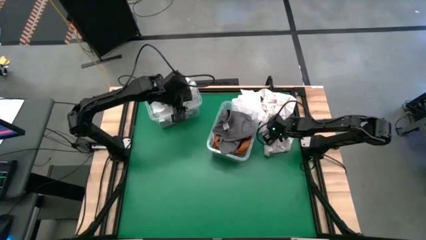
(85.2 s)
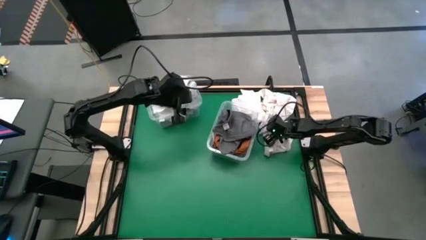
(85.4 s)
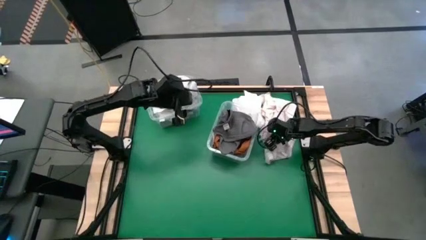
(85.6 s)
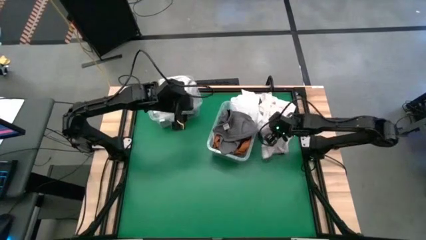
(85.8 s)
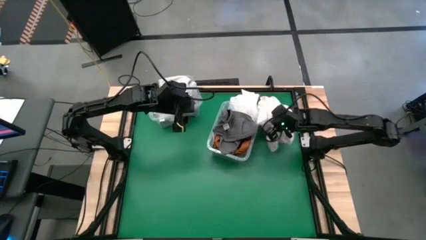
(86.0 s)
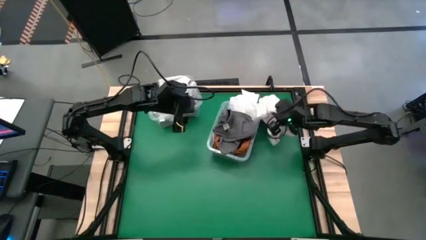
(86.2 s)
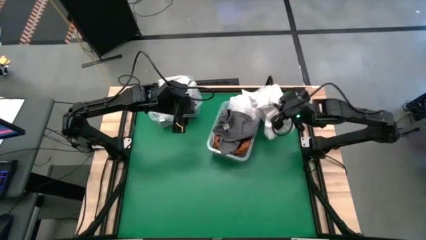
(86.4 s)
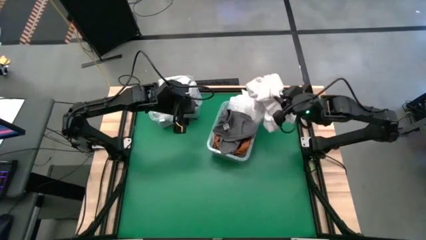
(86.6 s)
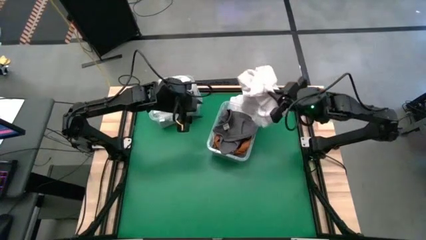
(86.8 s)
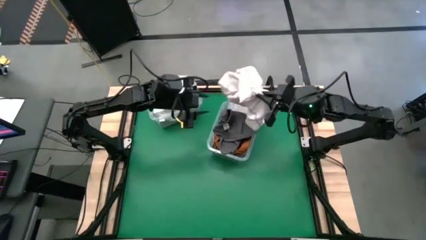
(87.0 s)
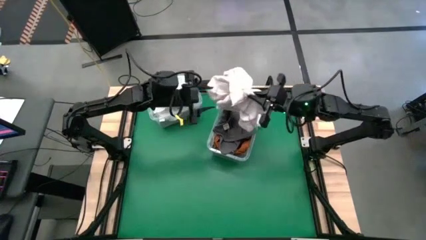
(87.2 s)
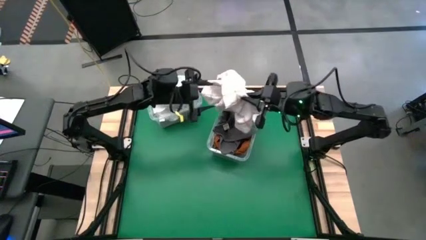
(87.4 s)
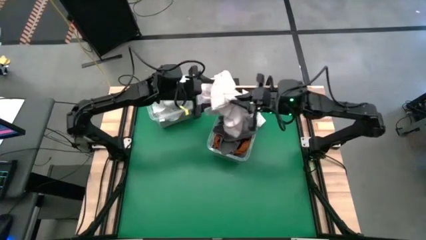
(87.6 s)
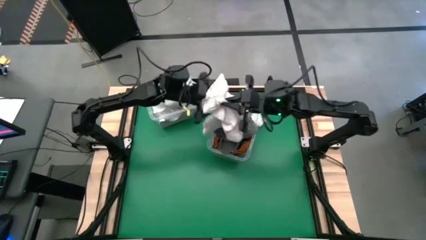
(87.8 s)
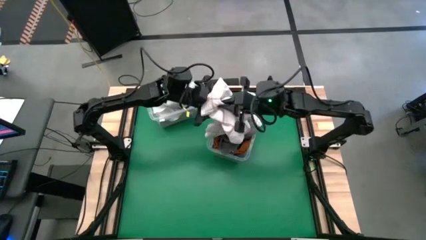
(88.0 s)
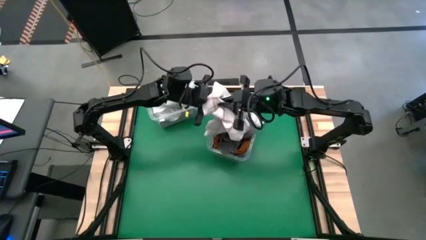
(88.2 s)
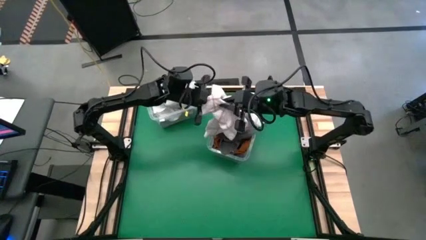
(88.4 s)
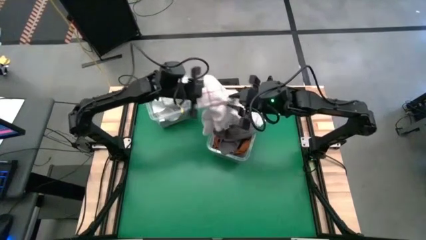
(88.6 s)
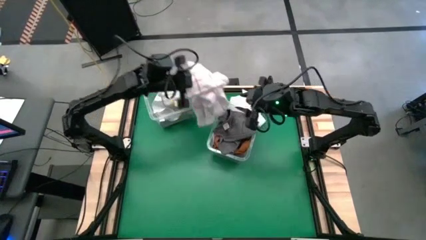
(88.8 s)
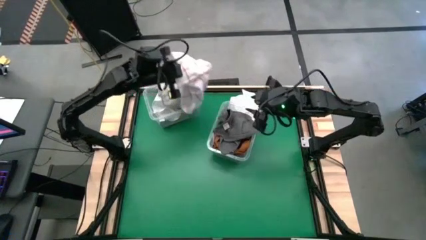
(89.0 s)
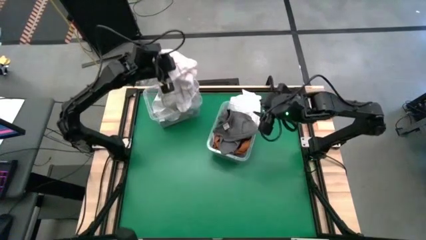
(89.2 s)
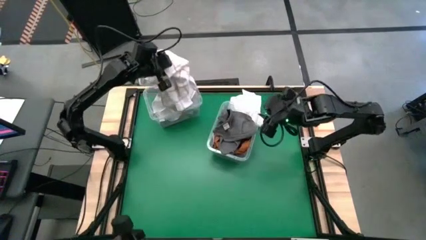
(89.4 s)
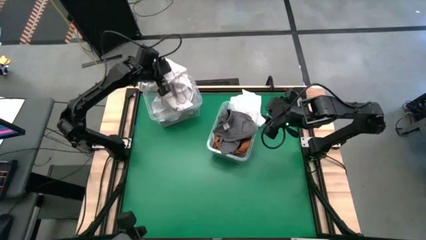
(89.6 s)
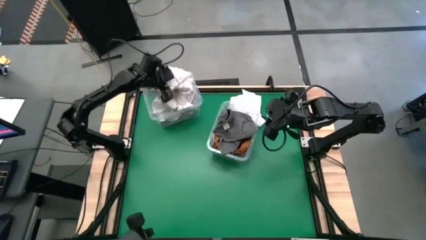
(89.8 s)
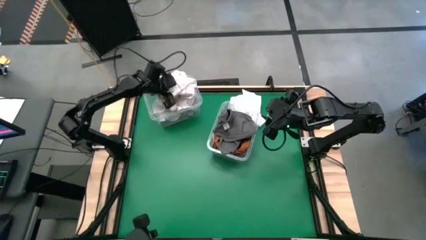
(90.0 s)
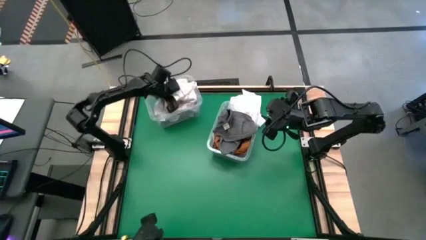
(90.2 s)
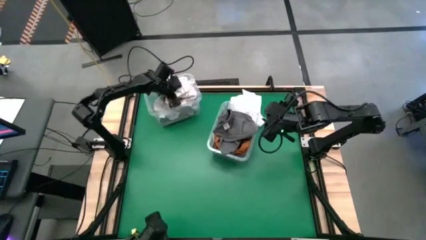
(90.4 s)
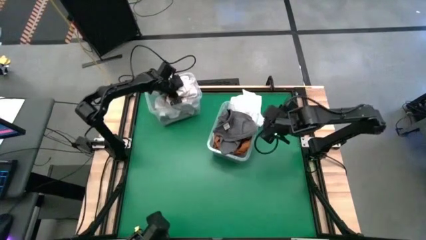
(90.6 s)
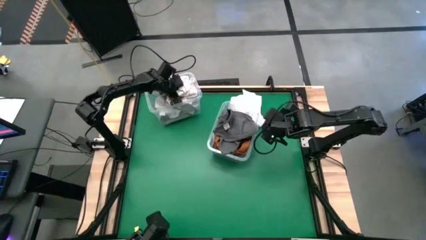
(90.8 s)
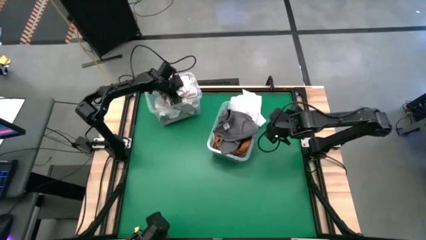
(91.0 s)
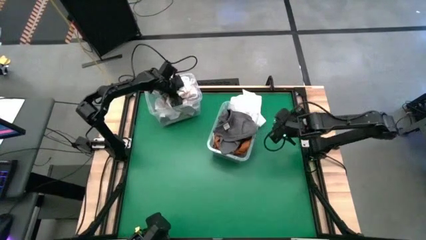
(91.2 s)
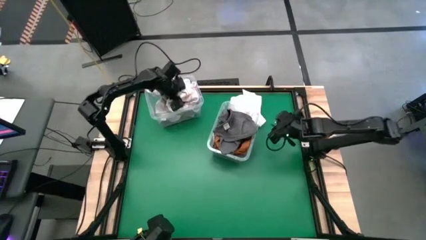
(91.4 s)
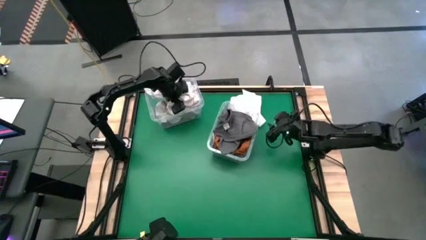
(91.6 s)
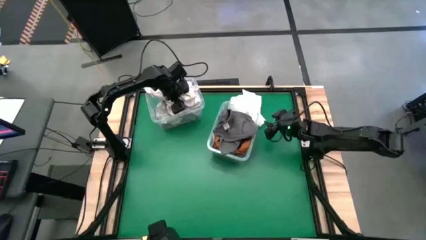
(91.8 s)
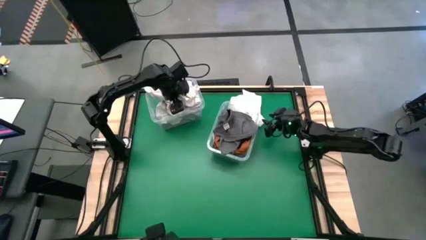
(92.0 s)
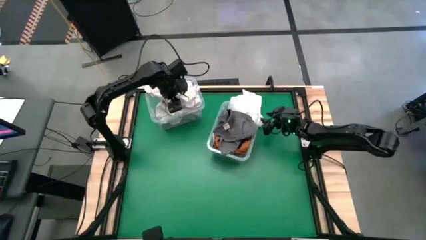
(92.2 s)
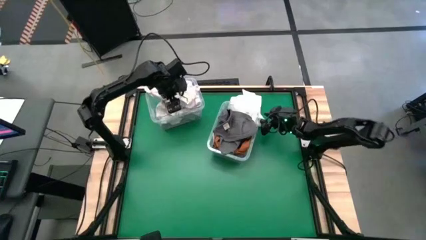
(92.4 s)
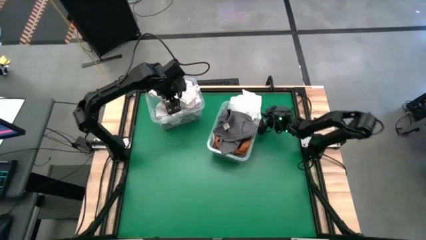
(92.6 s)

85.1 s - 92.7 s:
Task: Sort towels by color in basket
Put the white and orange towel into the left transparent bin

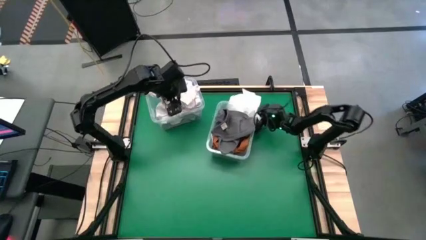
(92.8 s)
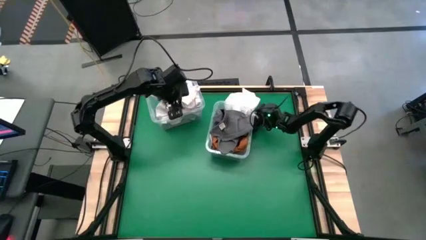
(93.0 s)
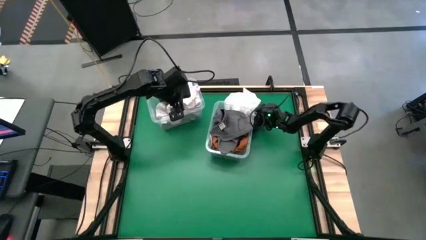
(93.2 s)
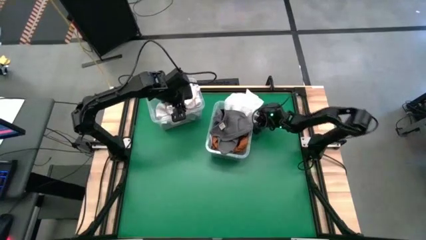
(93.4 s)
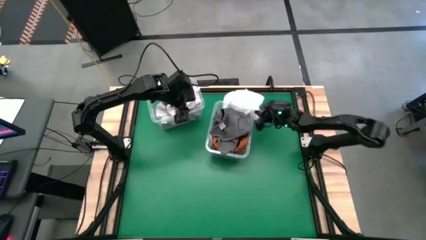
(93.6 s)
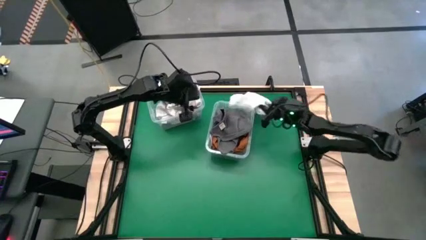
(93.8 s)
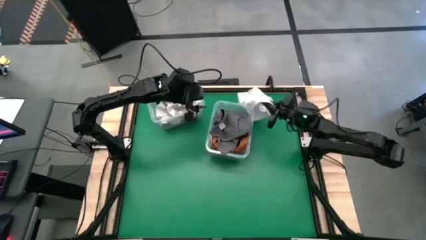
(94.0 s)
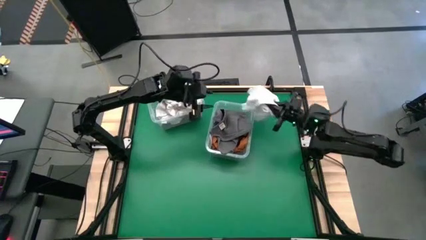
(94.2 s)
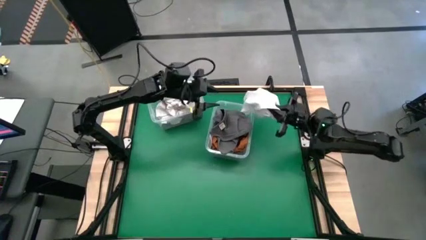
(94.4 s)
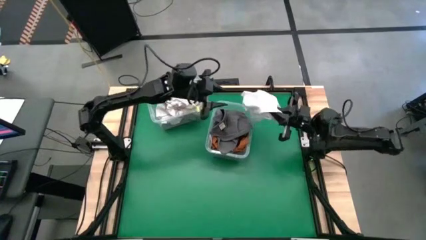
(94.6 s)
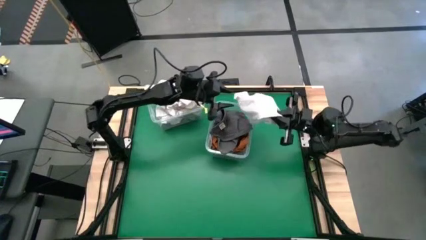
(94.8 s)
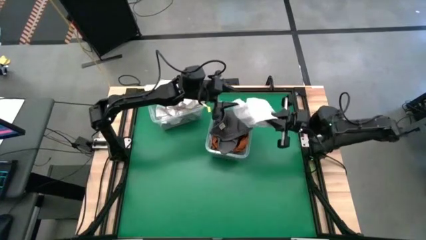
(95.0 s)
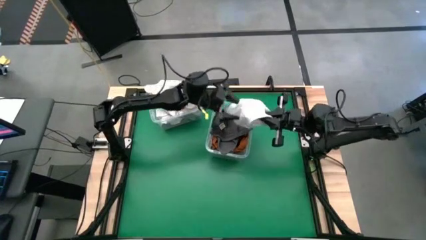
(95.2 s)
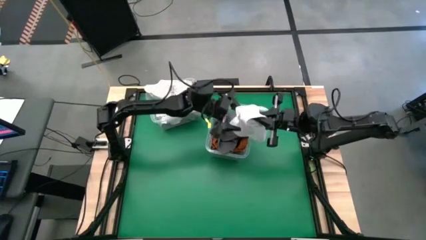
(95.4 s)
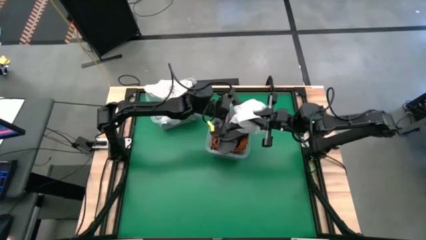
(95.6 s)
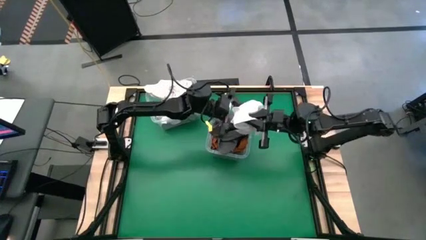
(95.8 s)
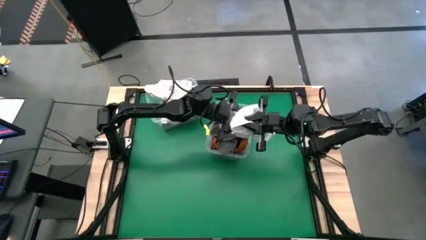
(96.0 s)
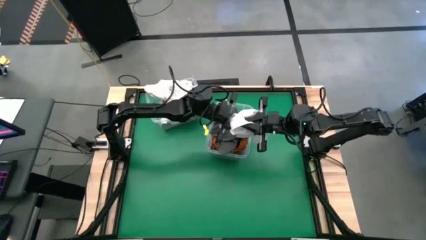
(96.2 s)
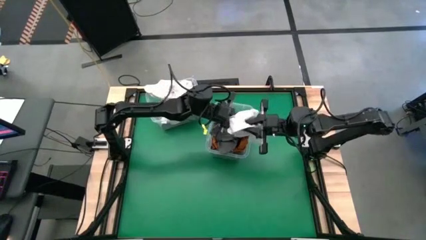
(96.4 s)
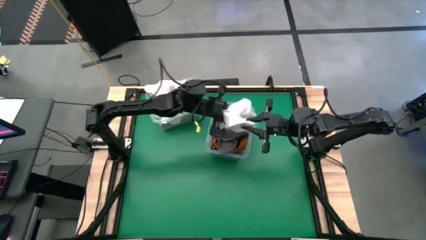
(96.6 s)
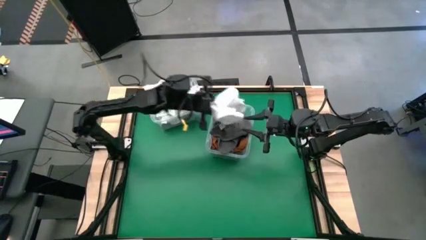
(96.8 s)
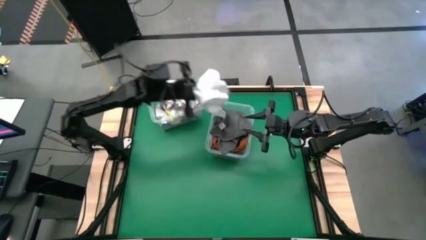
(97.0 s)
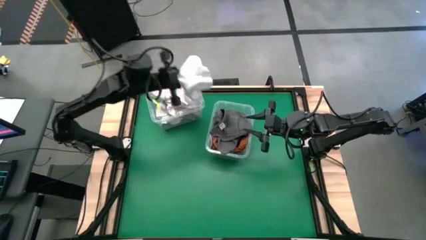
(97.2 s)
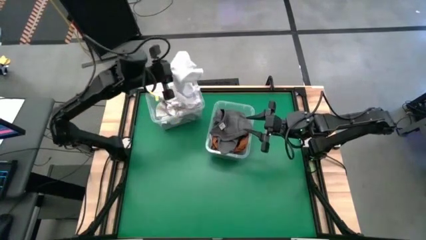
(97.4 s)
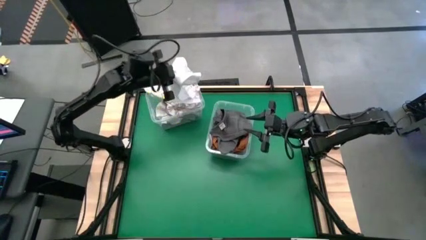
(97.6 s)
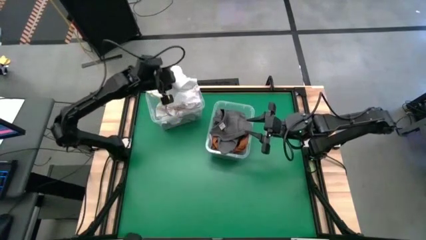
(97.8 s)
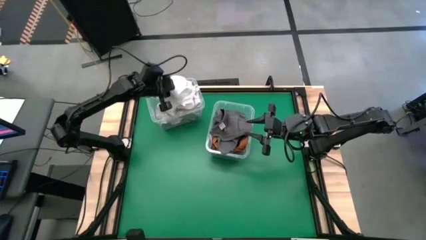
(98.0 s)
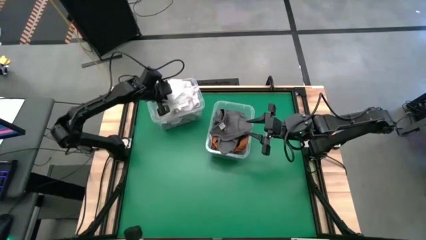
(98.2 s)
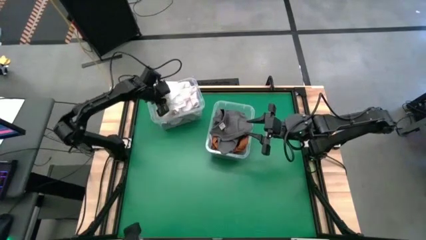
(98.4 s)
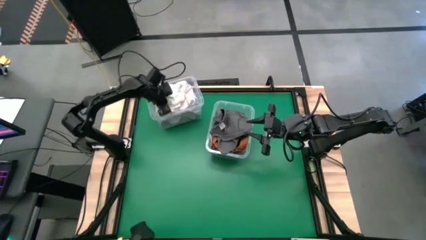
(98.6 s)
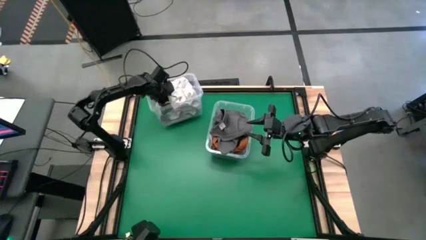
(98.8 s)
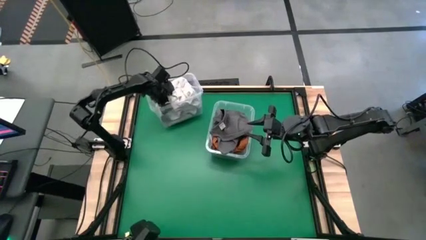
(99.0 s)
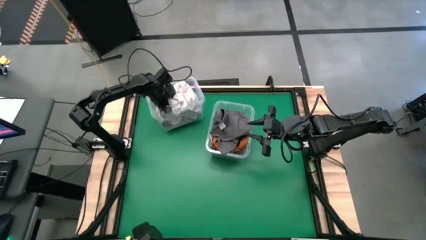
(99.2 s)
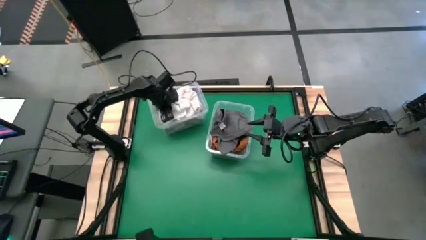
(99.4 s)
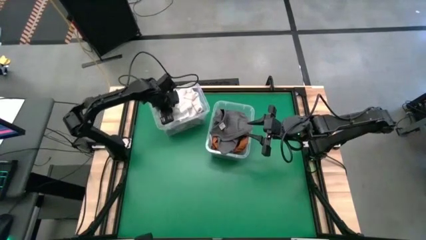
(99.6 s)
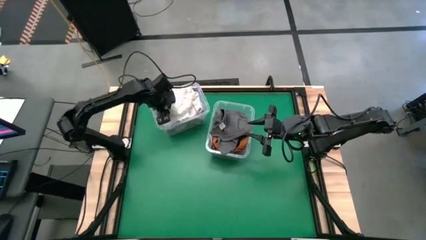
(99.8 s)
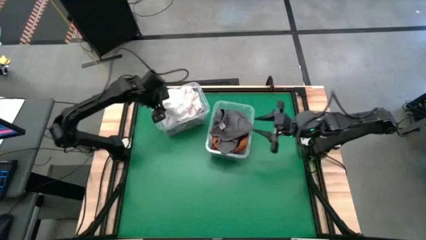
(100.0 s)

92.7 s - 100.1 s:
Put the white towel into the left transparent bin

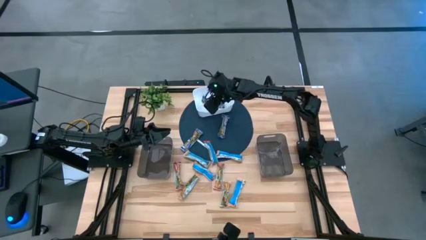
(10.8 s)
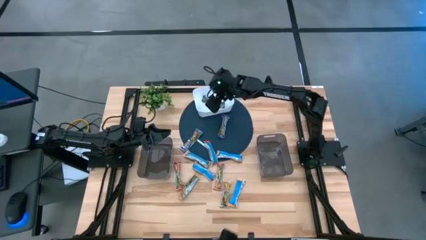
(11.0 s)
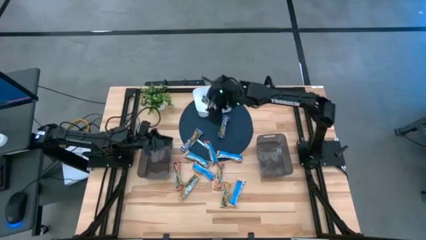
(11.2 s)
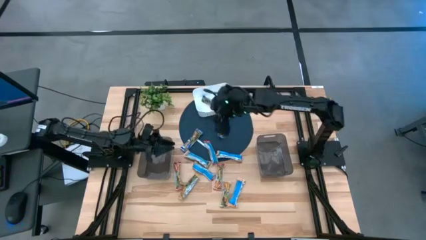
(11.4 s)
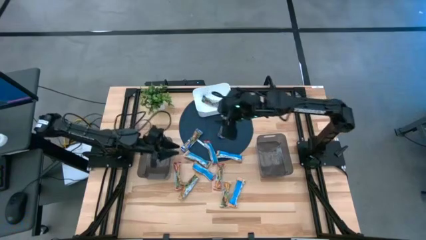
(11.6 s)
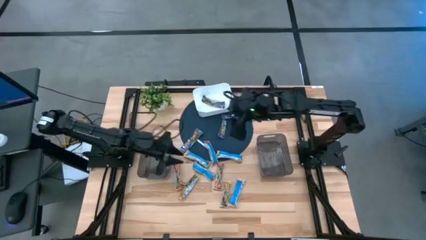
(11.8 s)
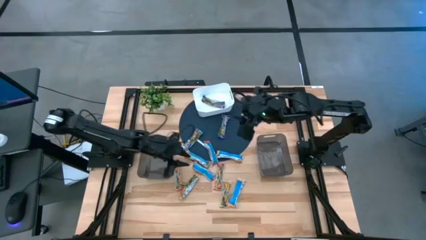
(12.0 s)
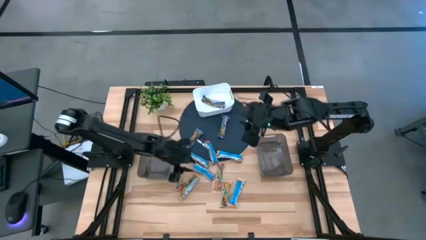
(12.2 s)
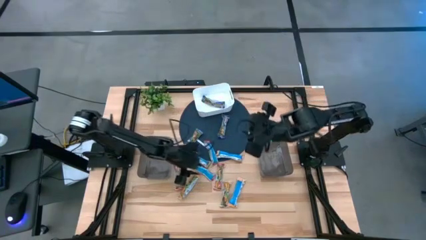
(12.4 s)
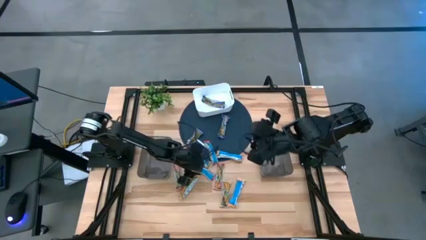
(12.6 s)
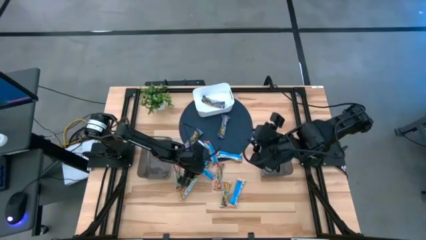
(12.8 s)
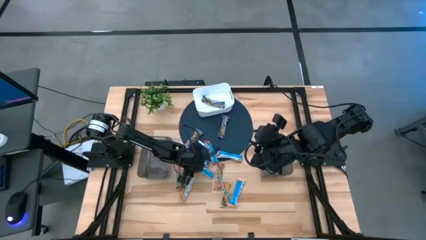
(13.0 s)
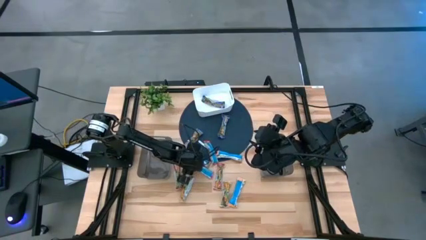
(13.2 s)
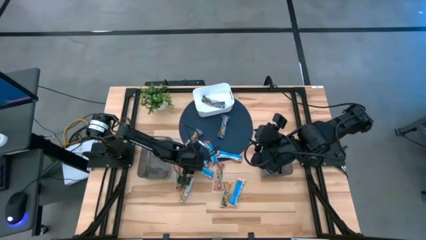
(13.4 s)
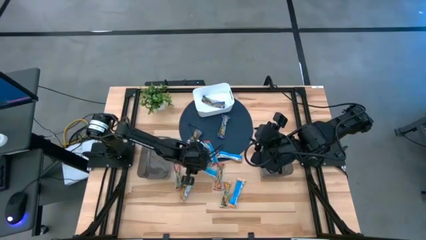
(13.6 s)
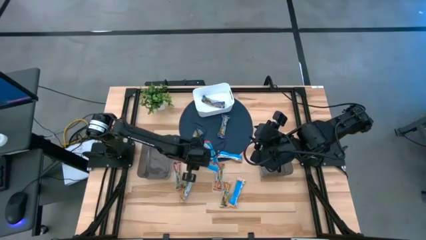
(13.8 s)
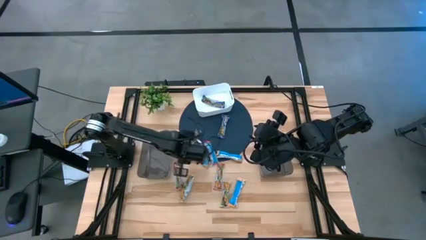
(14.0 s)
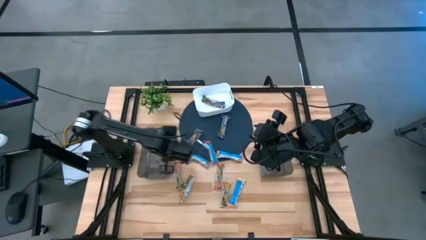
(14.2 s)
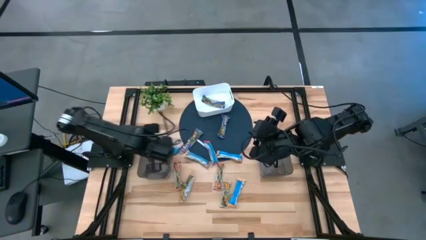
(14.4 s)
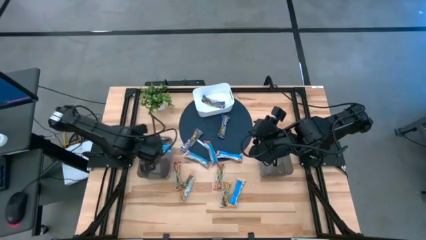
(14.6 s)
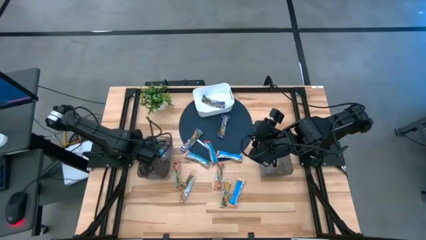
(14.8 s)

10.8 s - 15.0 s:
Task: Pick and place Granola Bars by type
Put the red granola bar into the left black bin
